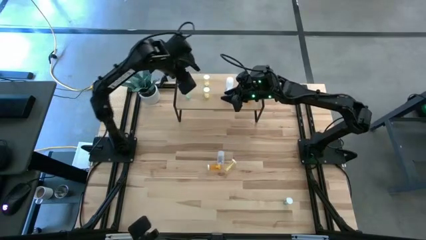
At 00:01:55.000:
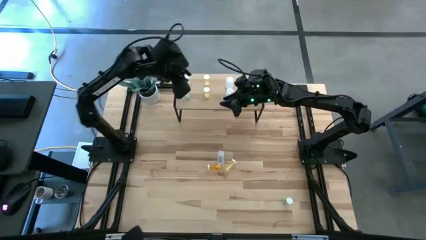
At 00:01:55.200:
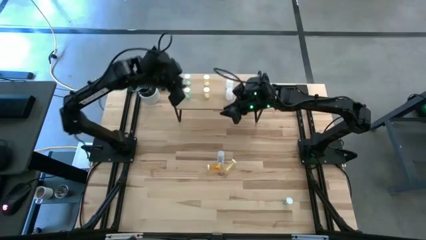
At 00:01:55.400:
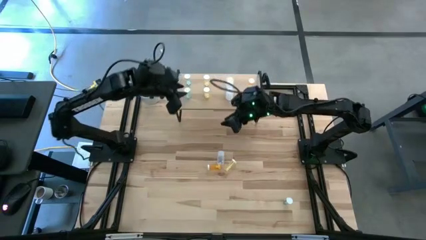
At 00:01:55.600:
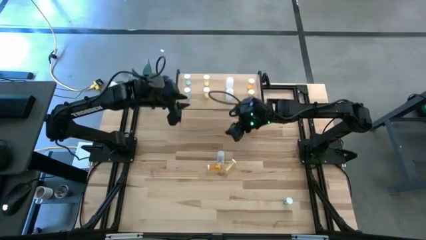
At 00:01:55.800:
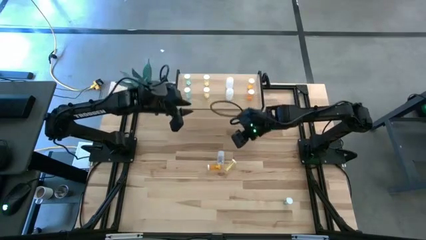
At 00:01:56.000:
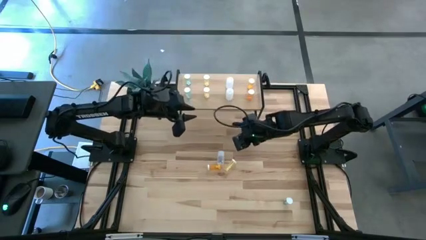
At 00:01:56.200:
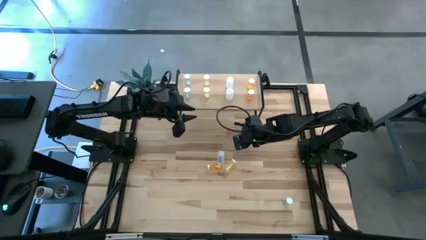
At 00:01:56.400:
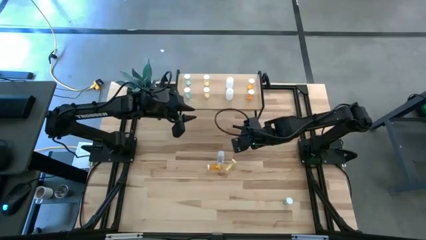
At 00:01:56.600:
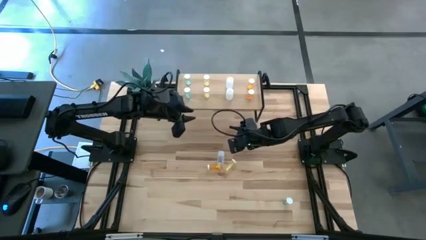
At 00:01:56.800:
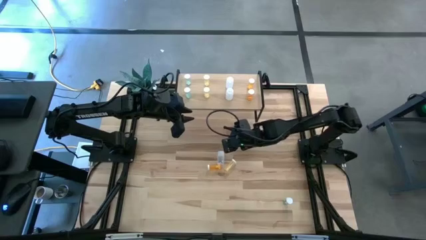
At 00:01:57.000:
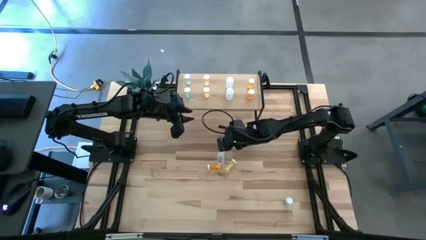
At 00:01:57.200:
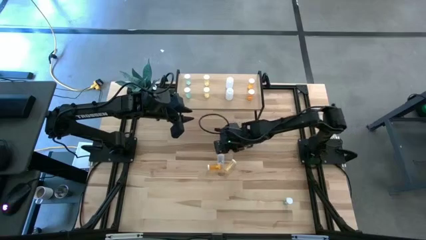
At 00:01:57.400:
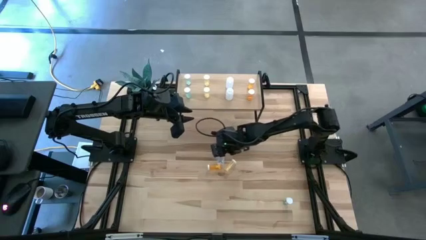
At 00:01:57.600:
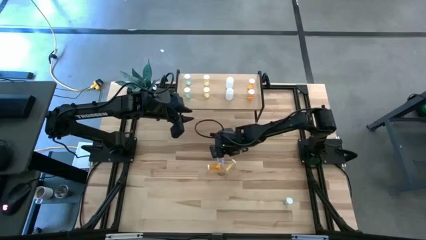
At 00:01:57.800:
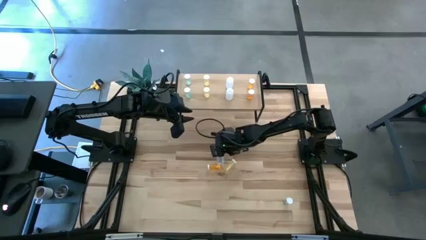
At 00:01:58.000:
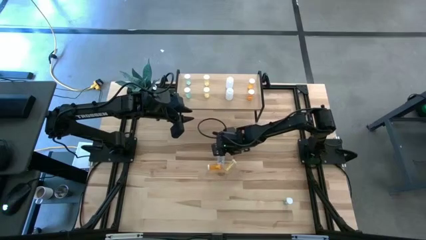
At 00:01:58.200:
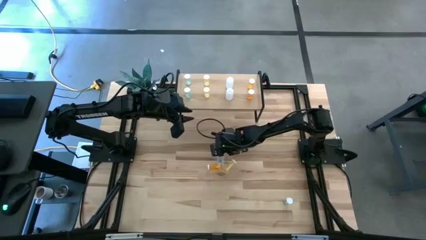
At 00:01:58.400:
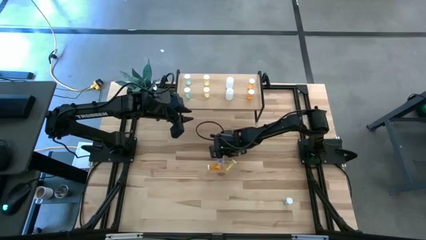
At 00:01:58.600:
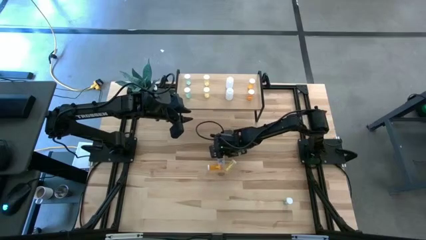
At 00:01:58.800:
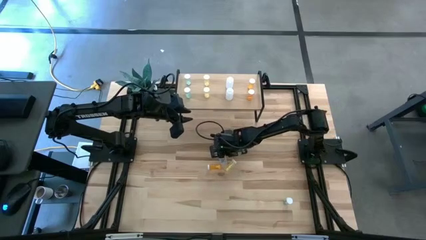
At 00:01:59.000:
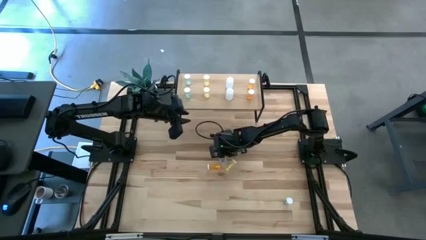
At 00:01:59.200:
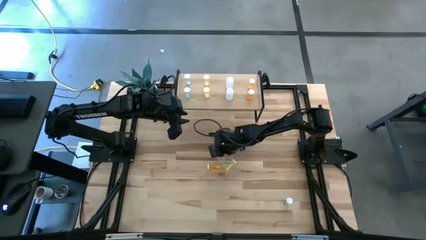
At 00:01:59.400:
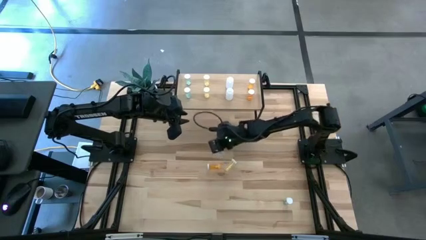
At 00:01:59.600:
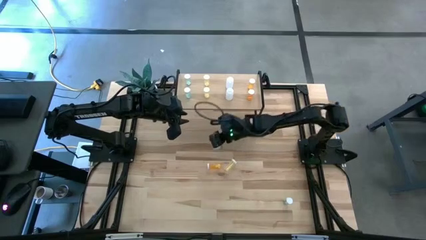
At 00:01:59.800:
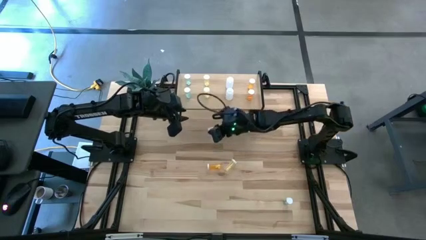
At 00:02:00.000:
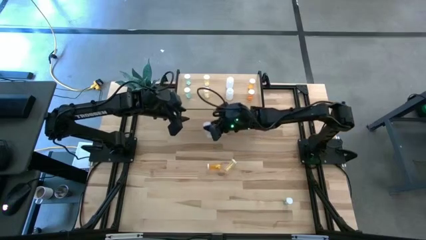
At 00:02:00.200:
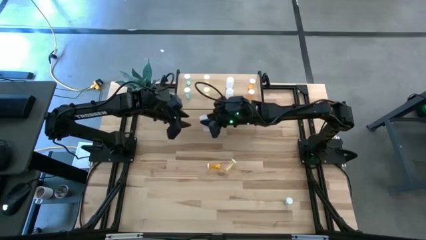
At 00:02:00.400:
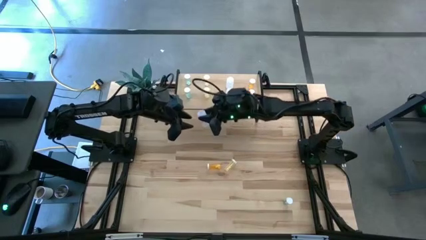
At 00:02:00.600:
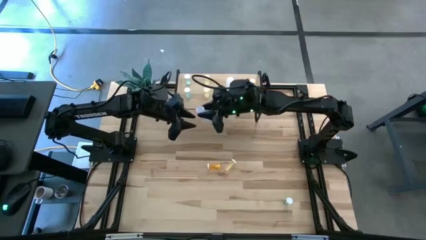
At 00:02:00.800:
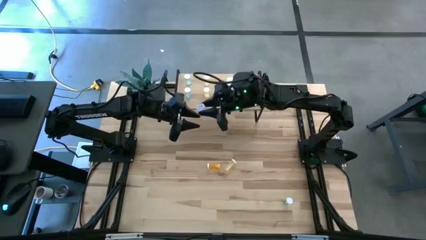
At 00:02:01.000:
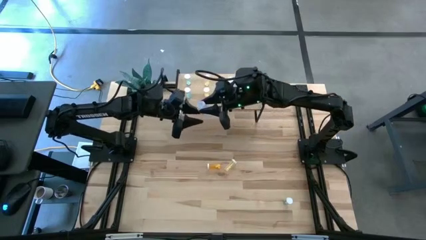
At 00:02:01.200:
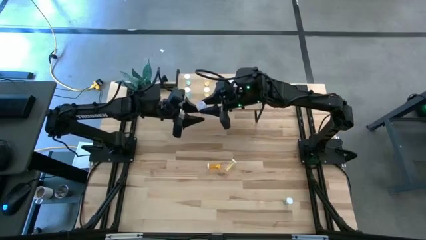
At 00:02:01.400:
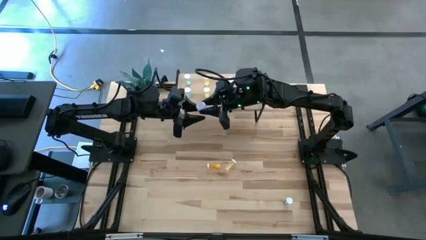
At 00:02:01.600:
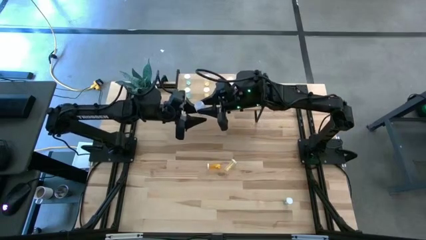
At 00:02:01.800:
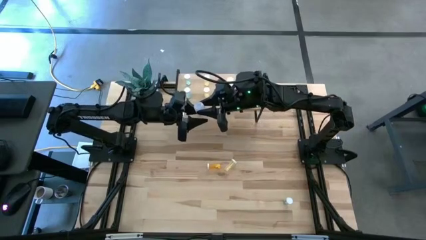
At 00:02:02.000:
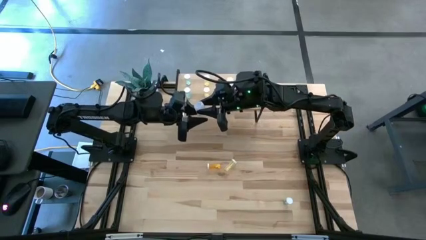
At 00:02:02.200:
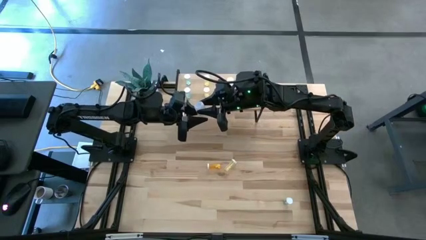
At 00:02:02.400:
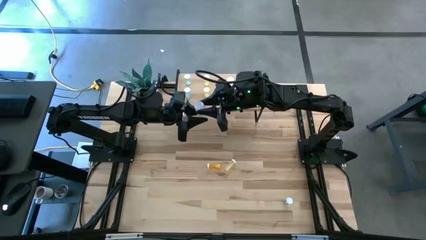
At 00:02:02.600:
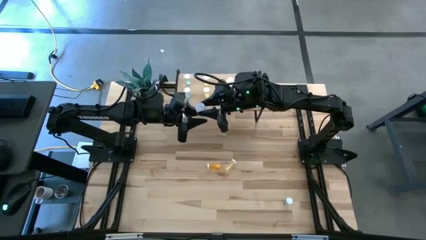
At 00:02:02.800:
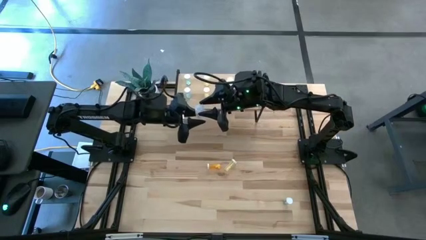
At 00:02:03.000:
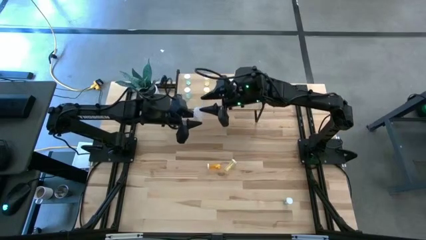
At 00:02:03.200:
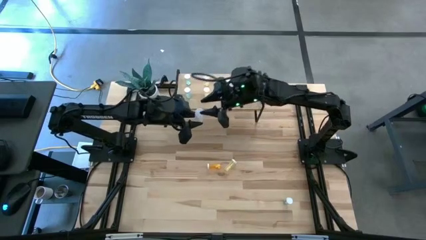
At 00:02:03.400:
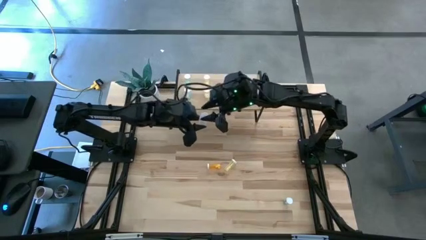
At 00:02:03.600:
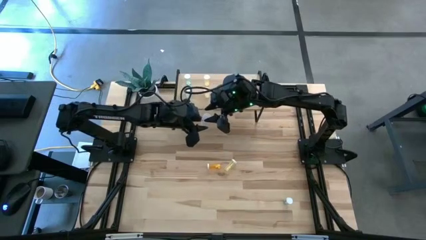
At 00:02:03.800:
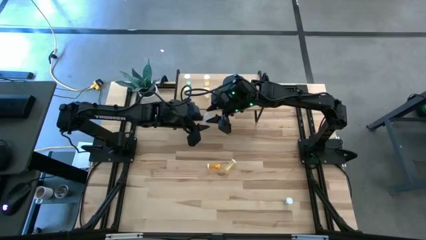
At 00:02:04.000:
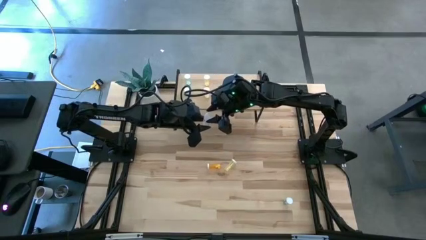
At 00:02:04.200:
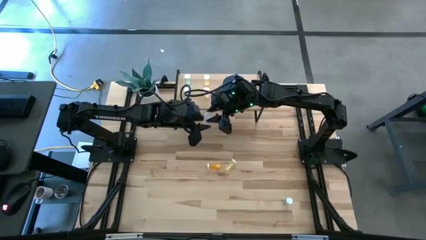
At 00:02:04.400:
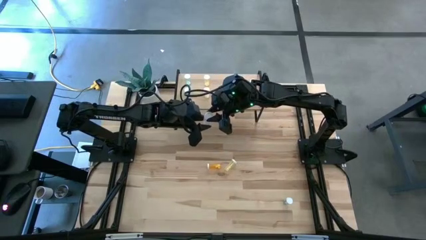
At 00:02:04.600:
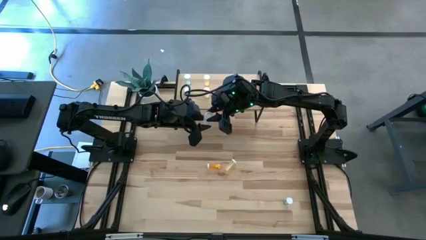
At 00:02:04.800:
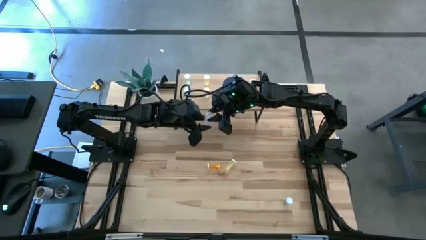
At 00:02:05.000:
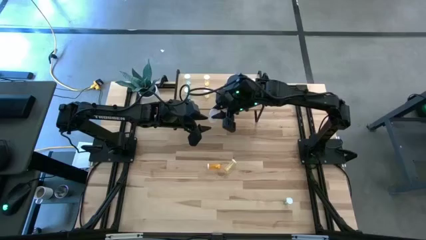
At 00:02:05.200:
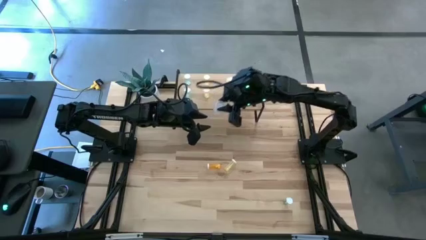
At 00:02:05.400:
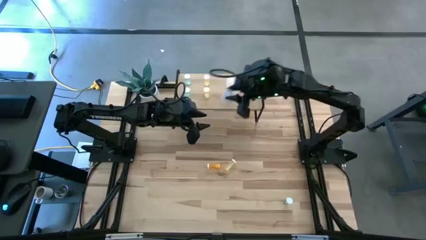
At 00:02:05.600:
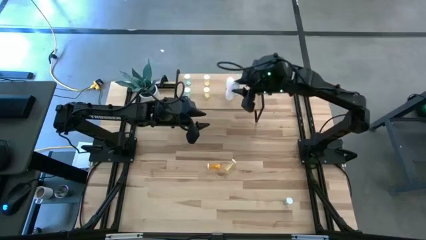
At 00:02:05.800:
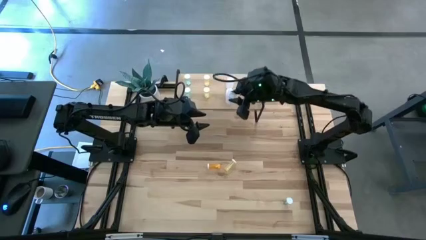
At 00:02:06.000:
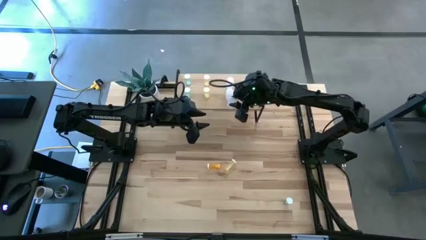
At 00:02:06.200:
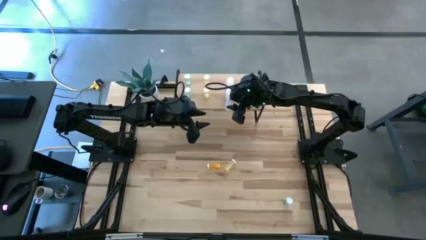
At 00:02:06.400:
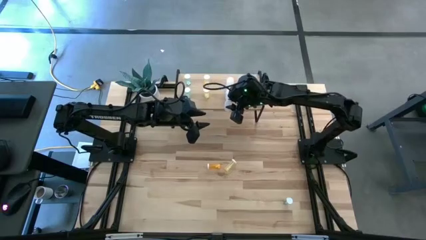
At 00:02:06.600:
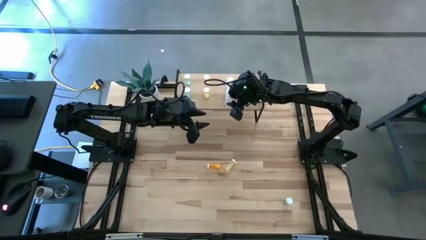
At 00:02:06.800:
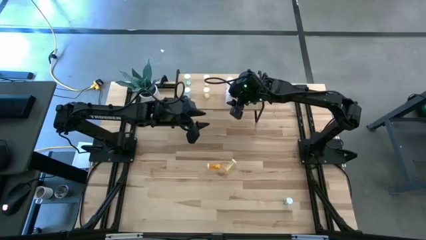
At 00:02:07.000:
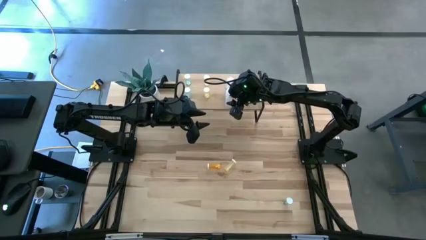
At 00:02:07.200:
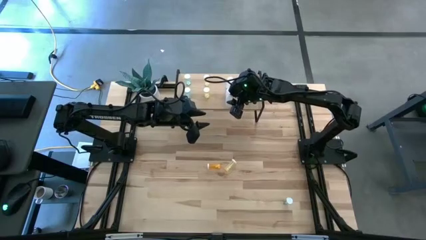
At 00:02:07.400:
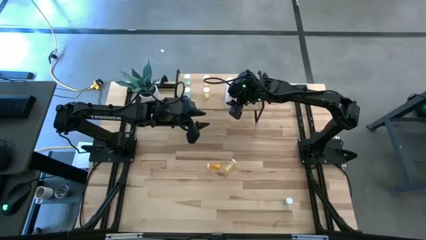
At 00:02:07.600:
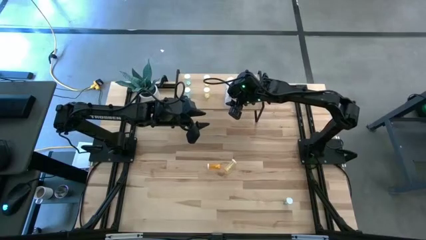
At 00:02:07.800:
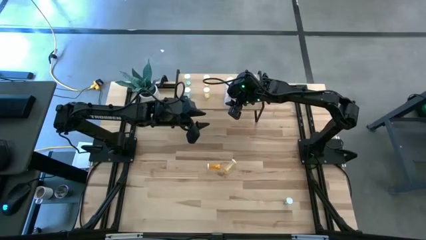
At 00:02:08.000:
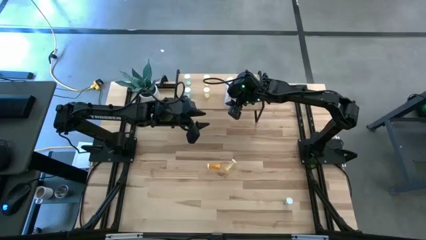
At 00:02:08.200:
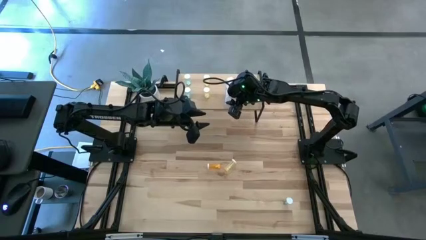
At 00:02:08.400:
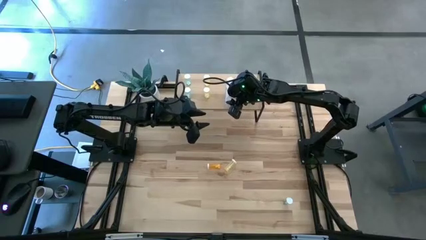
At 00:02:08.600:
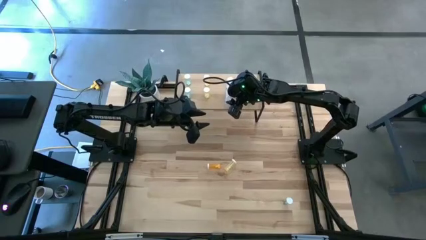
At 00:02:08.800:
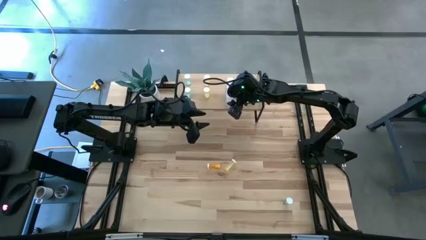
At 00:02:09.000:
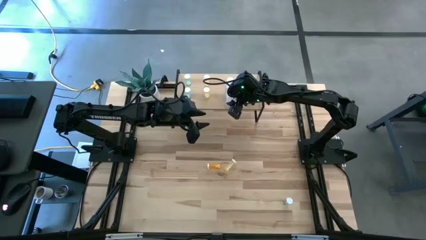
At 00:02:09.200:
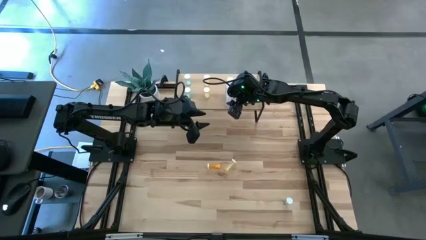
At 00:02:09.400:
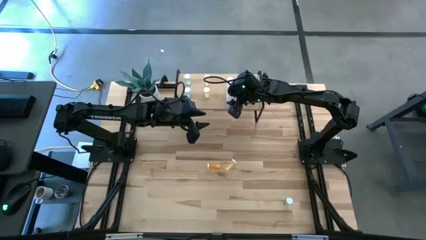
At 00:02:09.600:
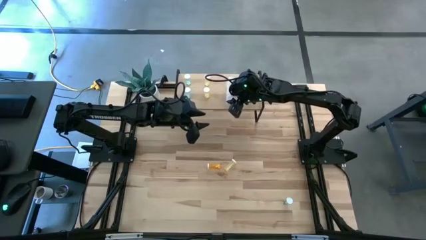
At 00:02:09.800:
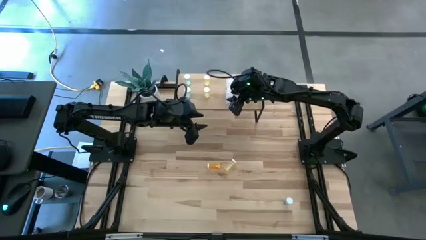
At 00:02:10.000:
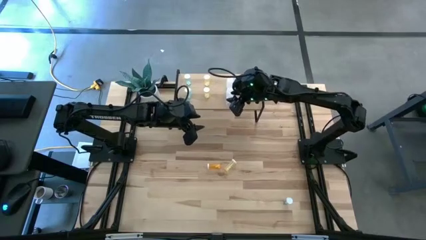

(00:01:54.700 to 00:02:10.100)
Task: Pick and place medicine bottles onto shelf by color
Put the transparent pill bottle aligned with the white pill bottle on the shelf
